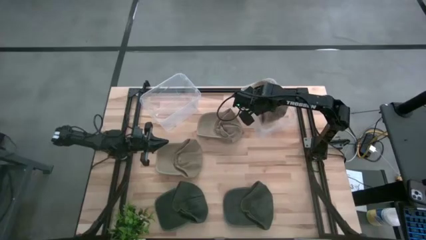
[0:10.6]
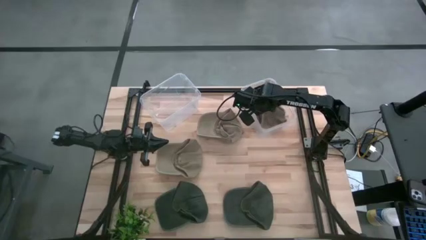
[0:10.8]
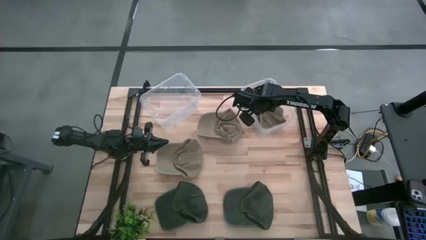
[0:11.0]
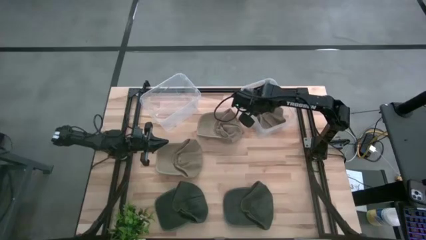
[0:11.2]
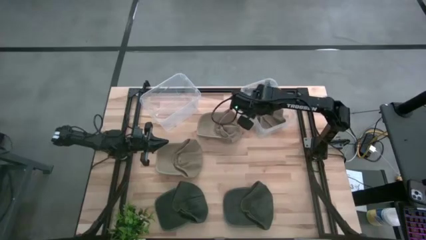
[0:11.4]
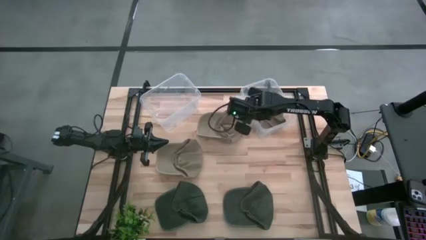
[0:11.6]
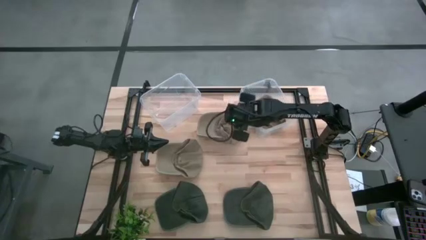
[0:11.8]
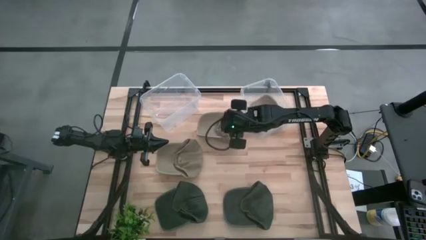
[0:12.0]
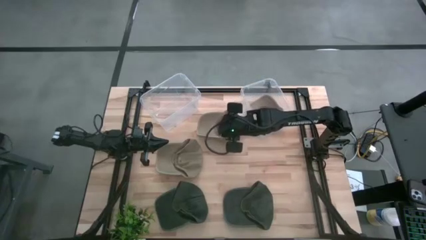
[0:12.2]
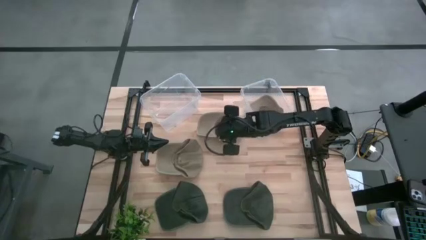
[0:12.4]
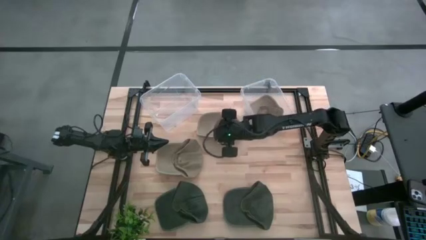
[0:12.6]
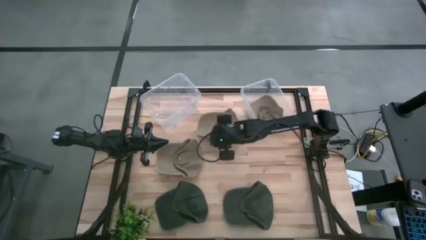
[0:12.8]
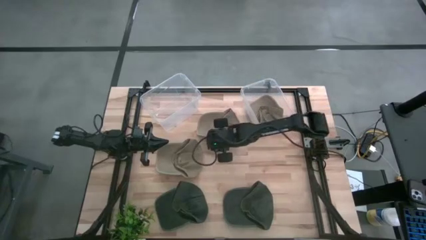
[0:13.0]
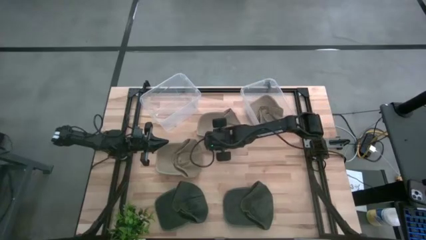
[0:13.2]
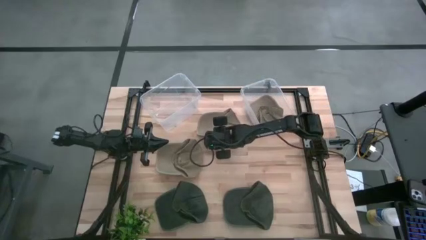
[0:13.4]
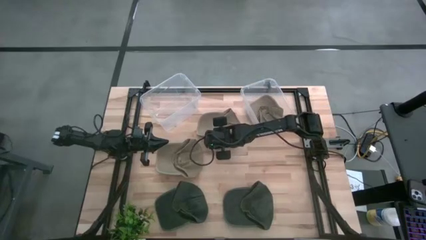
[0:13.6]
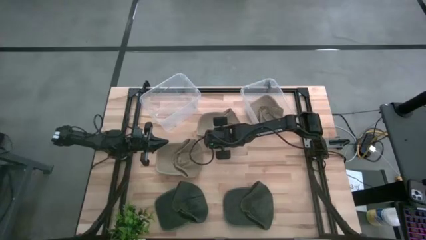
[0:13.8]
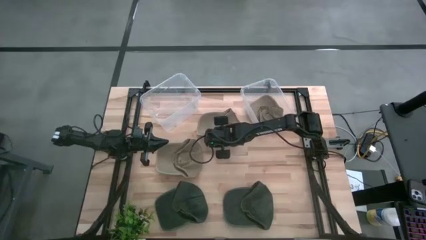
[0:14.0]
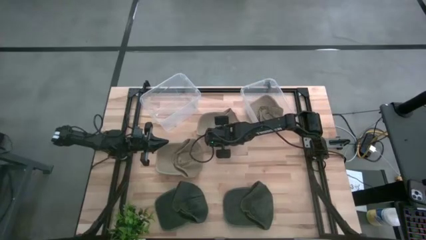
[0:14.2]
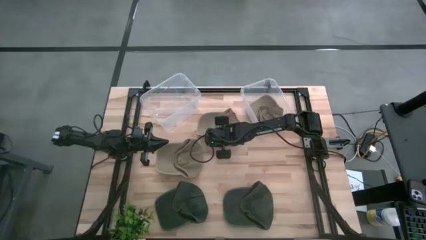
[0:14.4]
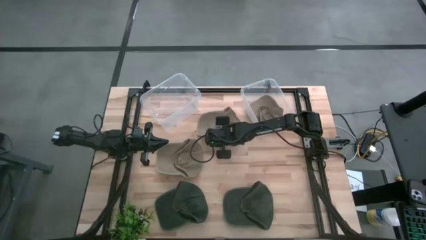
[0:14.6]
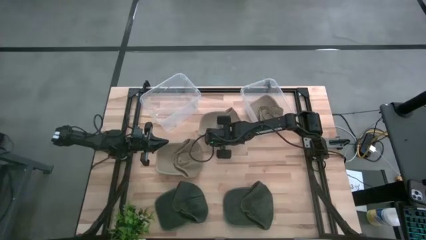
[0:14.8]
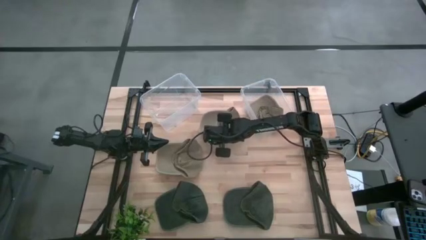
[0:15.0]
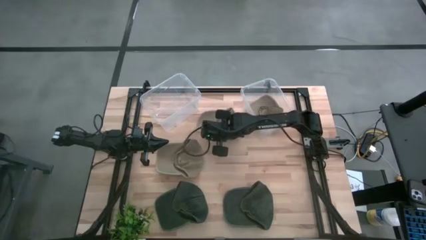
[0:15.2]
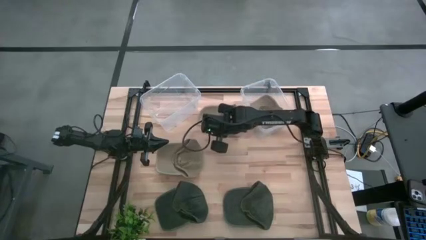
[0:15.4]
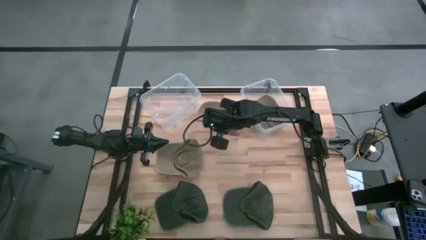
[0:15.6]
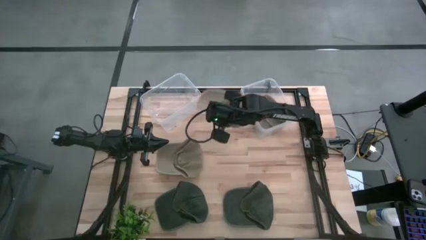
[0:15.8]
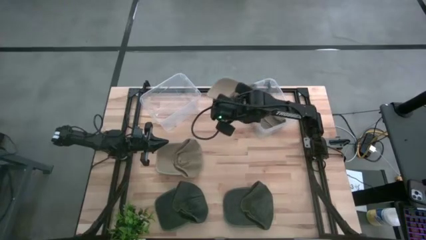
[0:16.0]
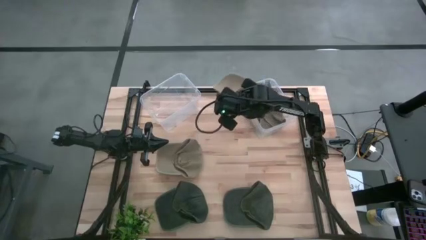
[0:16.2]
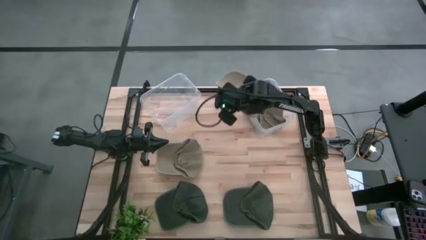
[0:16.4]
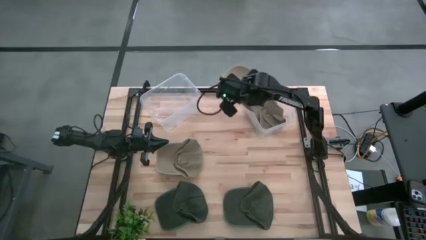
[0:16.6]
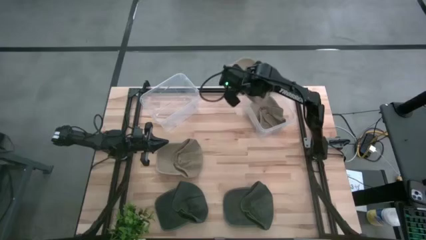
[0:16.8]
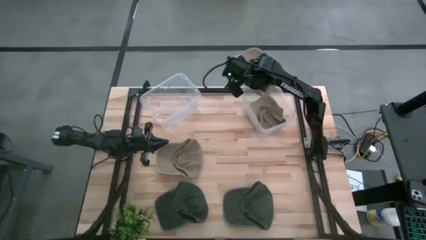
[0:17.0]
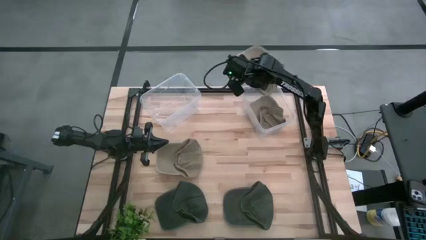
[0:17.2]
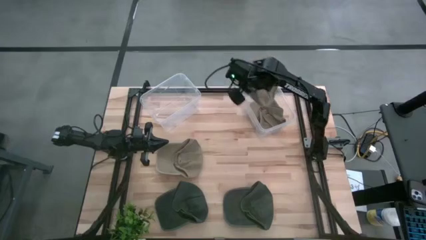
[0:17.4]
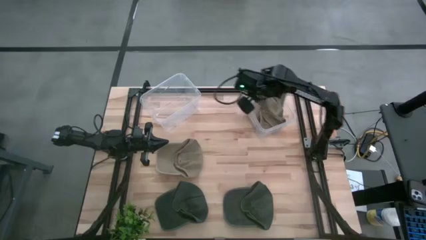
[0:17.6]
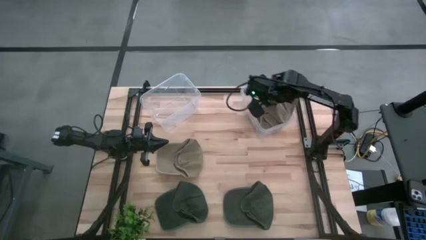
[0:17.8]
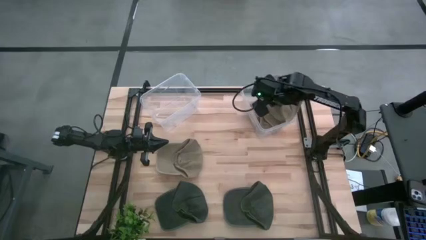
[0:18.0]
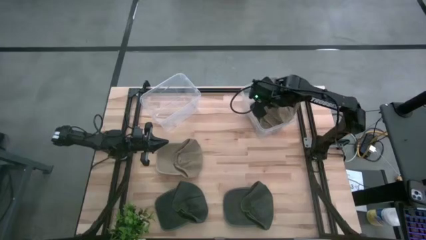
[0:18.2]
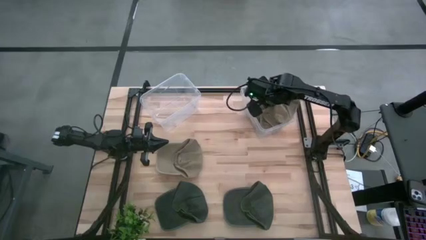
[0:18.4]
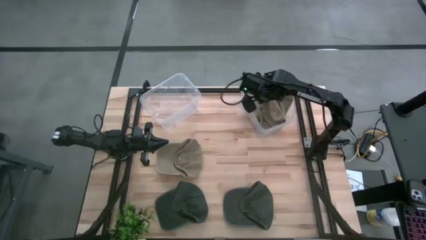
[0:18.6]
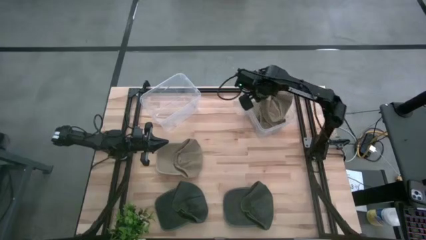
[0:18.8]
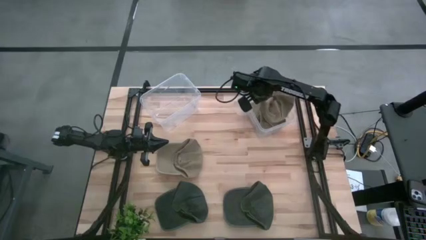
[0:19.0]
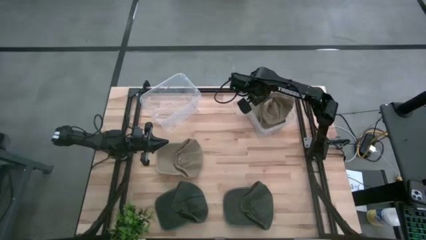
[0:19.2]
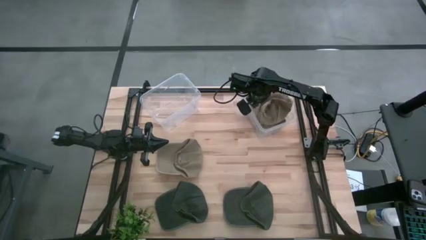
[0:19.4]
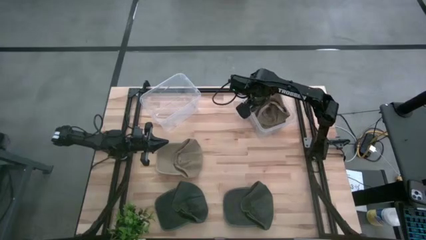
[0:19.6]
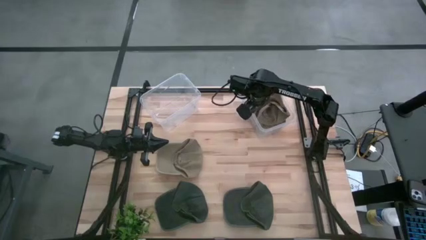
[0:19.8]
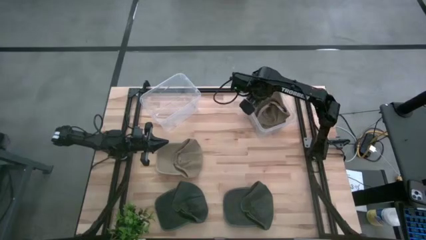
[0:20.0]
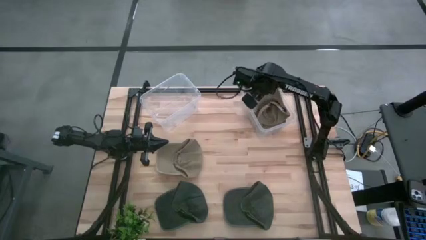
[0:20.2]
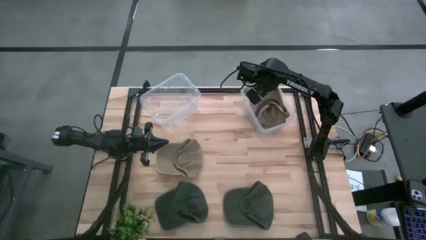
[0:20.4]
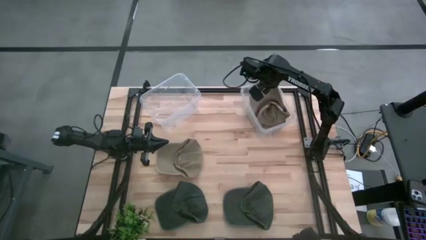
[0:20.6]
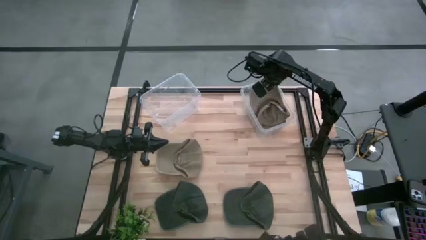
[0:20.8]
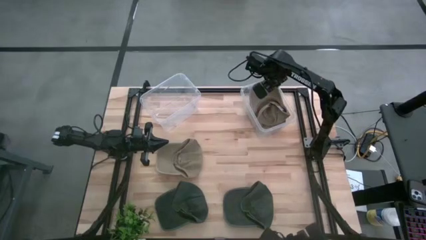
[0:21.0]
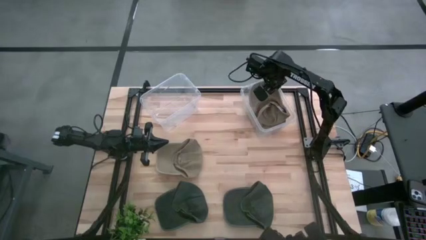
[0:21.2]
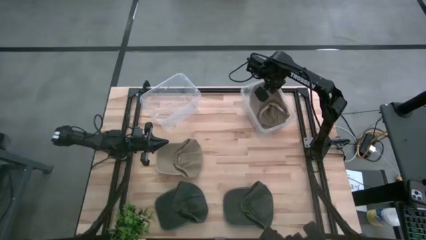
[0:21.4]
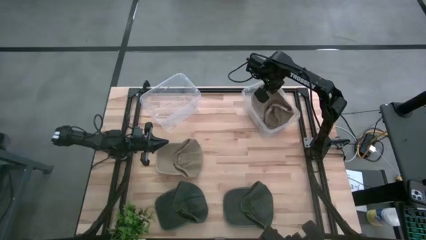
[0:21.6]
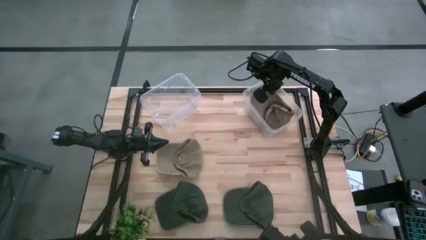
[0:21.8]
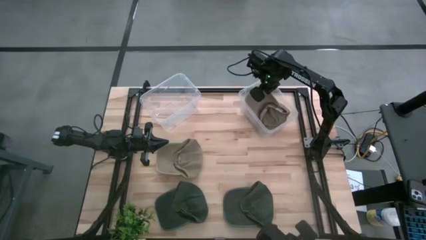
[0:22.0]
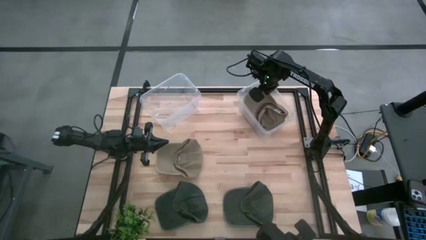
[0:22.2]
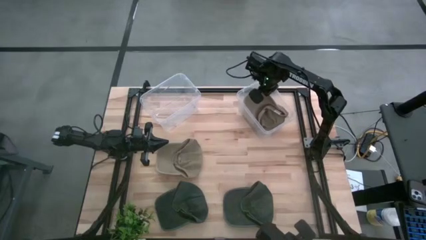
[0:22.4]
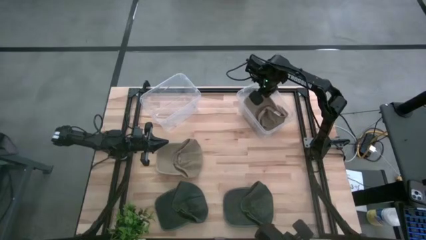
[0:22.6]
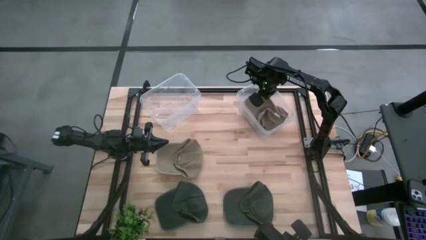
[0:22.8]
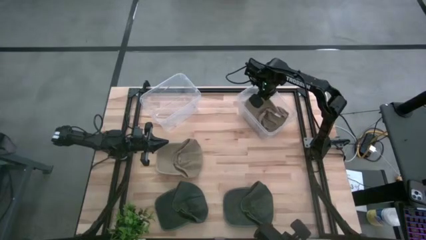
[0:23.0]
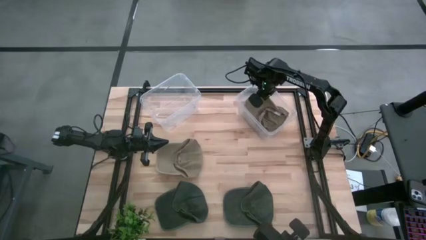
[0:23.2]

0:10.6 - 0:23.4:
Task: Pick & Place hat
Put the top brown cap into the right transparent bin
